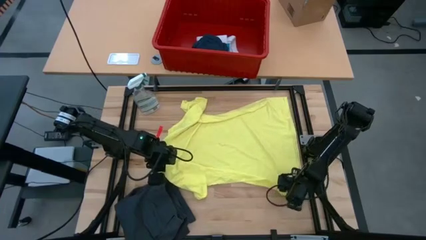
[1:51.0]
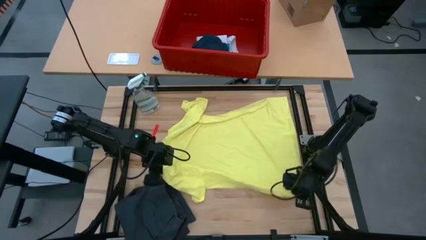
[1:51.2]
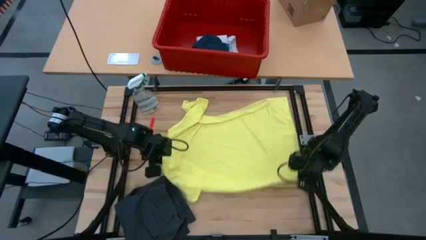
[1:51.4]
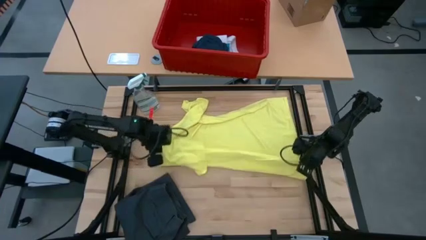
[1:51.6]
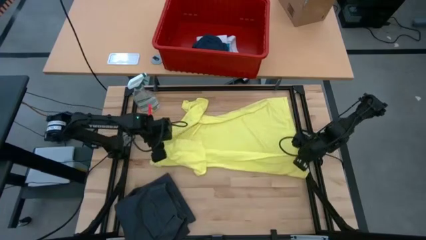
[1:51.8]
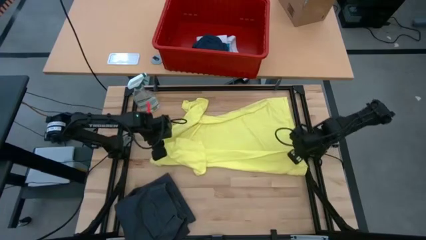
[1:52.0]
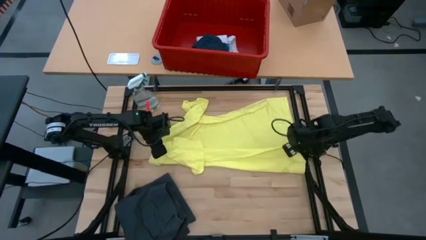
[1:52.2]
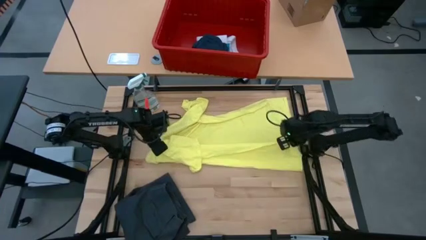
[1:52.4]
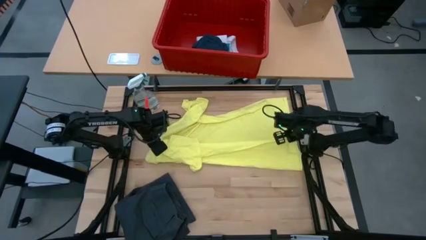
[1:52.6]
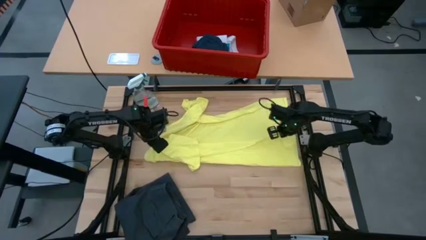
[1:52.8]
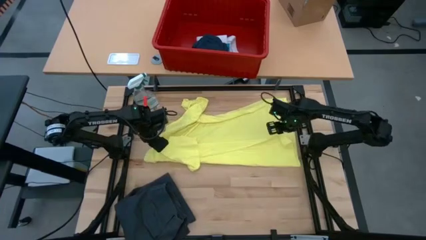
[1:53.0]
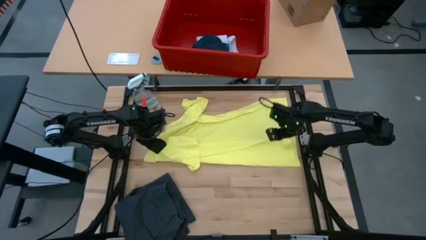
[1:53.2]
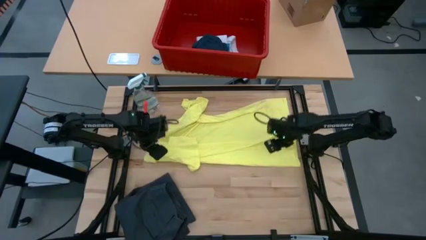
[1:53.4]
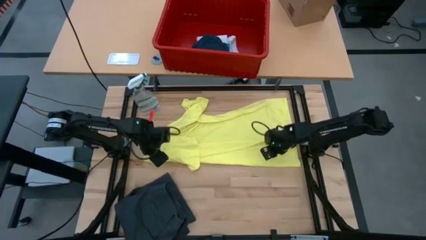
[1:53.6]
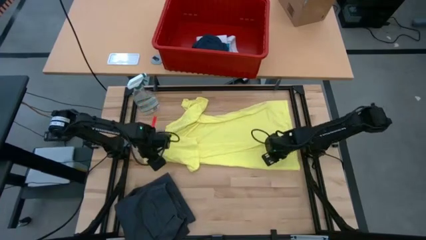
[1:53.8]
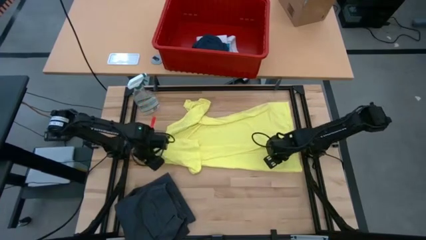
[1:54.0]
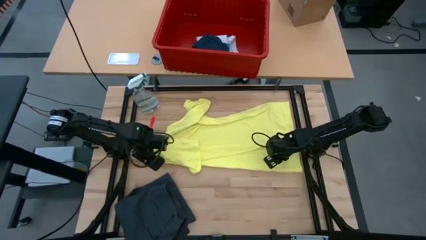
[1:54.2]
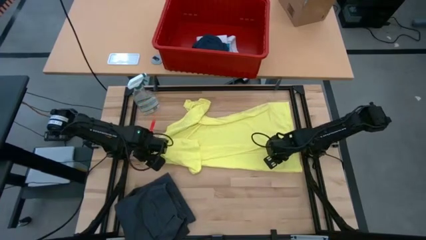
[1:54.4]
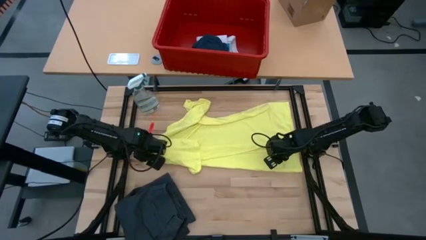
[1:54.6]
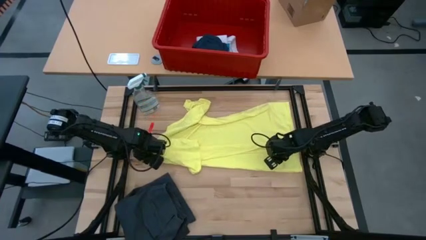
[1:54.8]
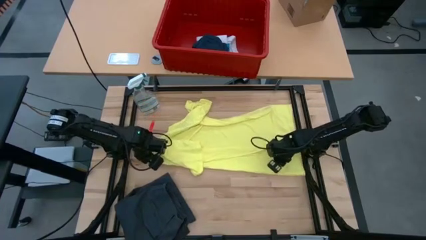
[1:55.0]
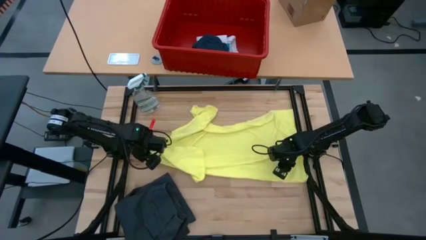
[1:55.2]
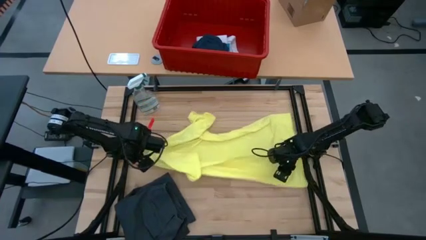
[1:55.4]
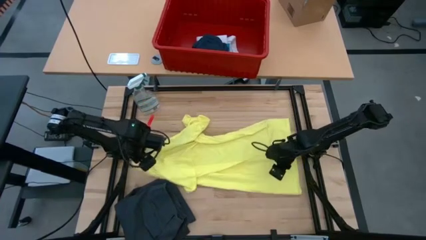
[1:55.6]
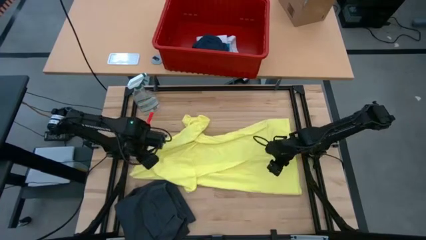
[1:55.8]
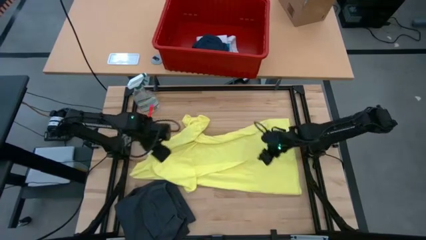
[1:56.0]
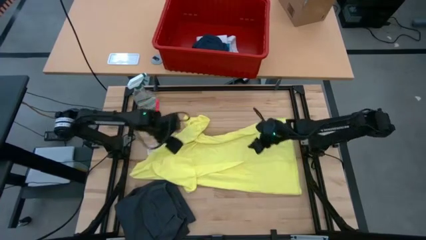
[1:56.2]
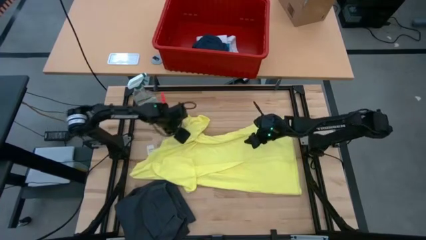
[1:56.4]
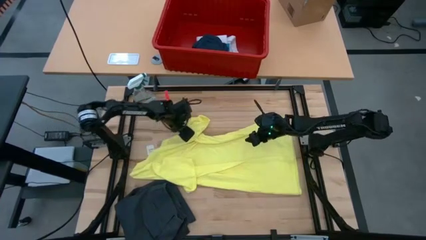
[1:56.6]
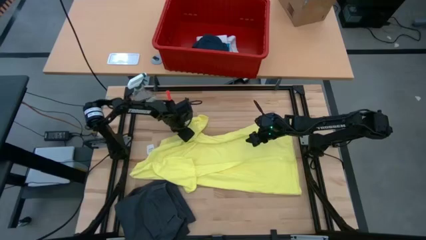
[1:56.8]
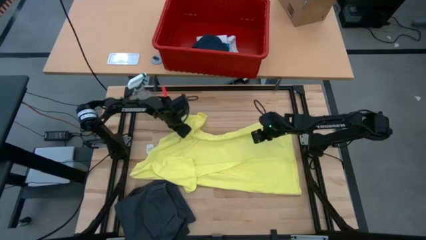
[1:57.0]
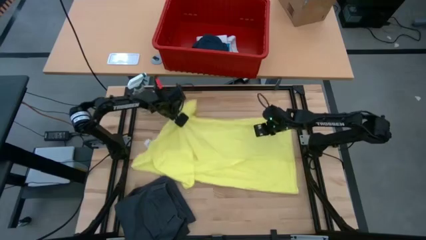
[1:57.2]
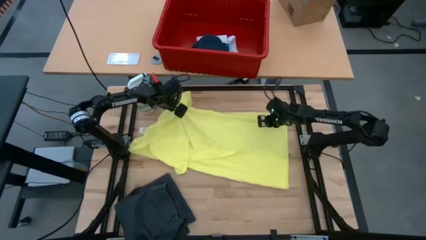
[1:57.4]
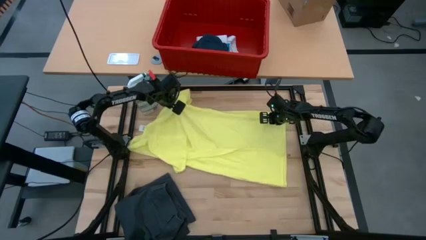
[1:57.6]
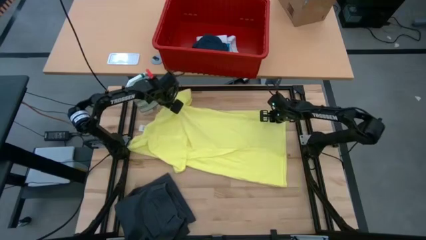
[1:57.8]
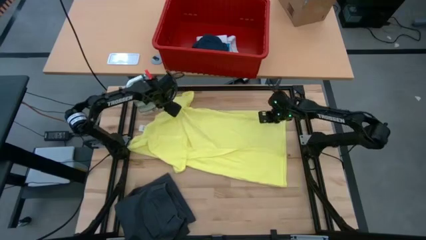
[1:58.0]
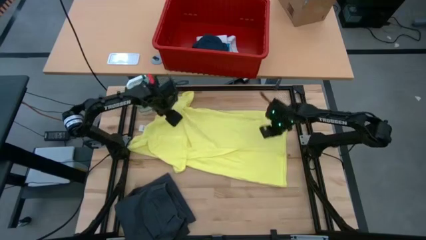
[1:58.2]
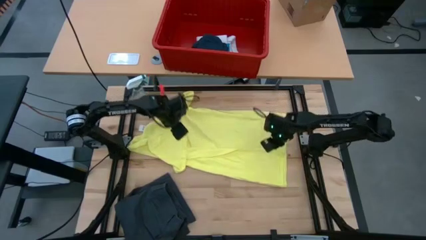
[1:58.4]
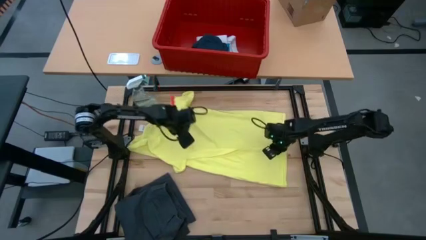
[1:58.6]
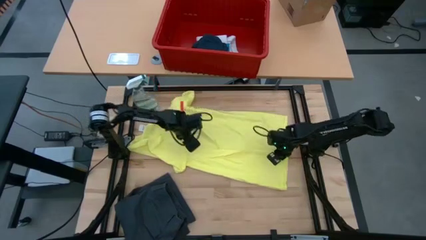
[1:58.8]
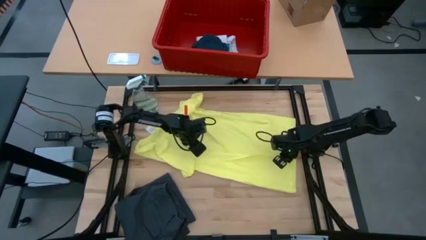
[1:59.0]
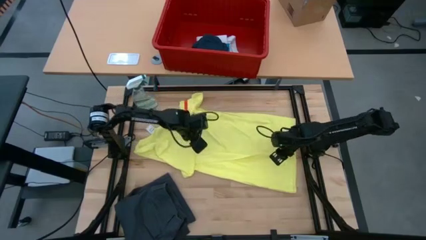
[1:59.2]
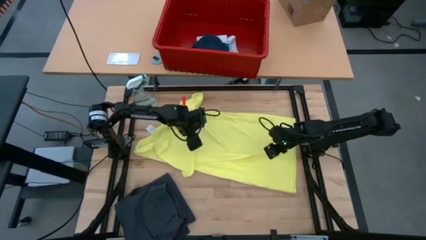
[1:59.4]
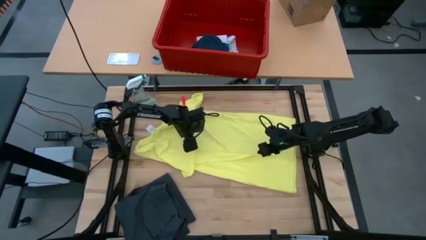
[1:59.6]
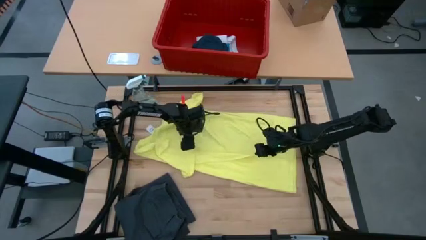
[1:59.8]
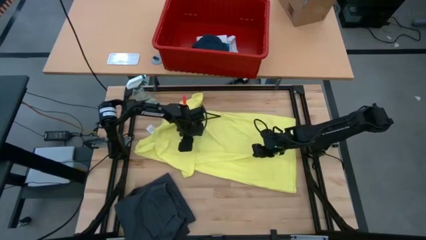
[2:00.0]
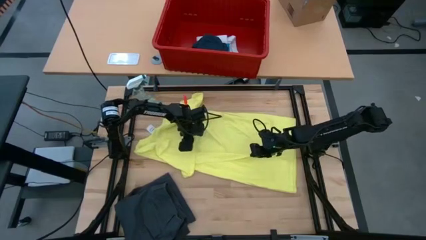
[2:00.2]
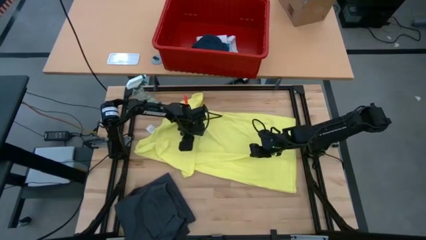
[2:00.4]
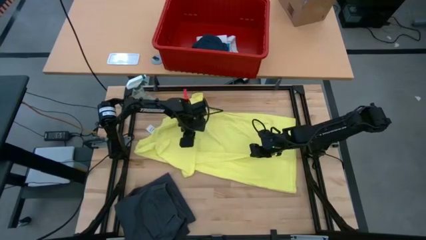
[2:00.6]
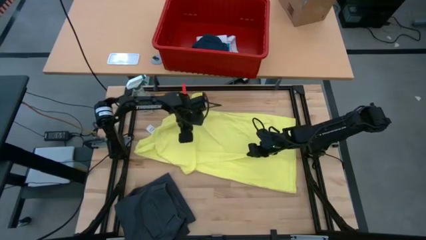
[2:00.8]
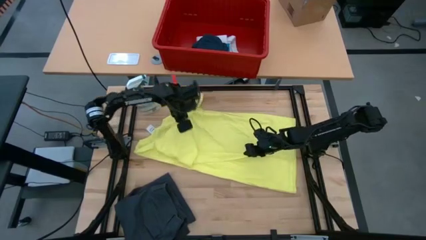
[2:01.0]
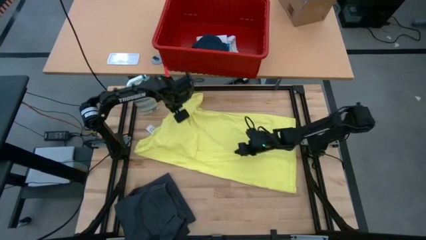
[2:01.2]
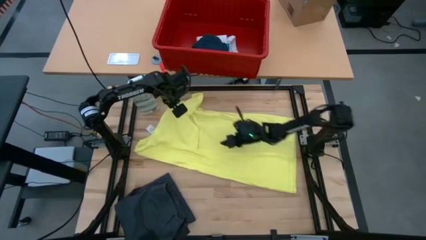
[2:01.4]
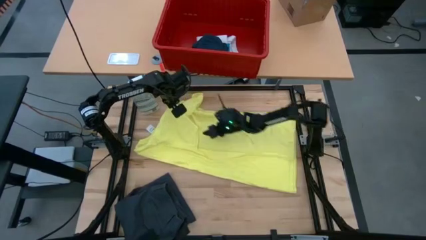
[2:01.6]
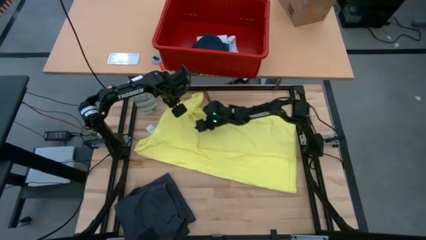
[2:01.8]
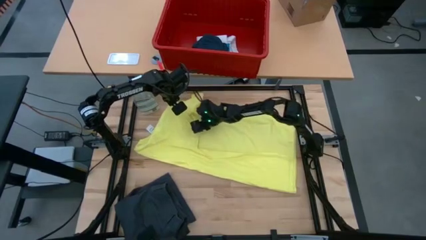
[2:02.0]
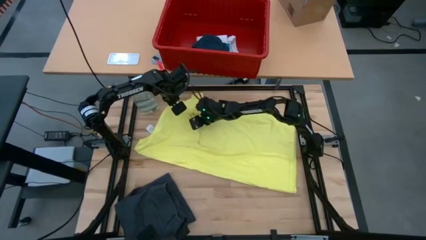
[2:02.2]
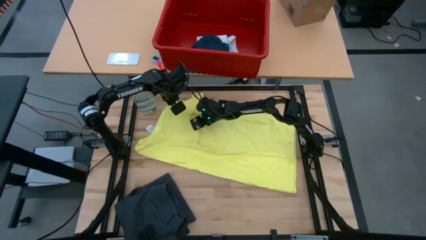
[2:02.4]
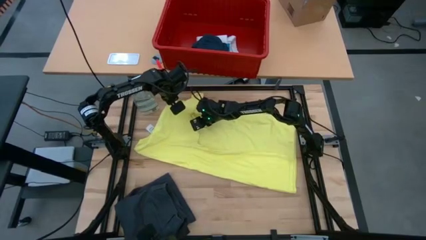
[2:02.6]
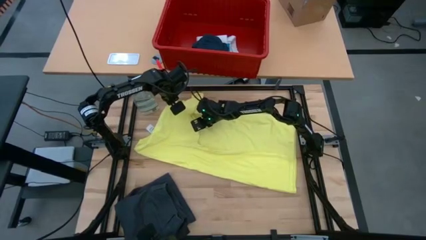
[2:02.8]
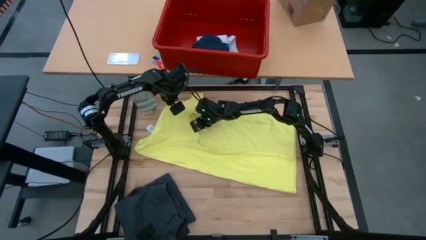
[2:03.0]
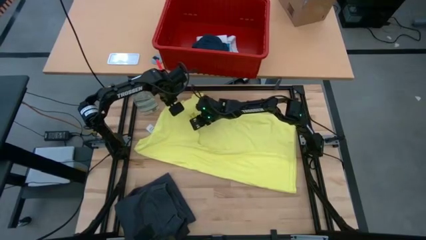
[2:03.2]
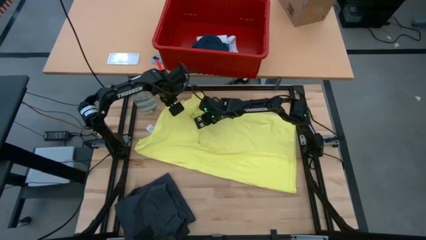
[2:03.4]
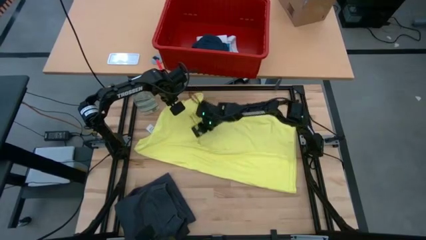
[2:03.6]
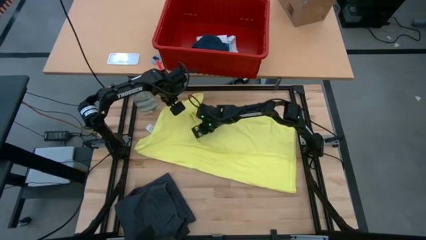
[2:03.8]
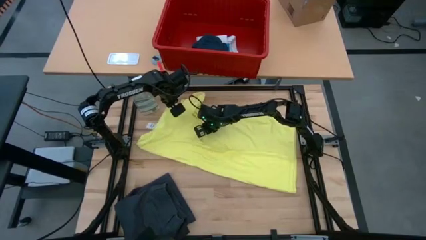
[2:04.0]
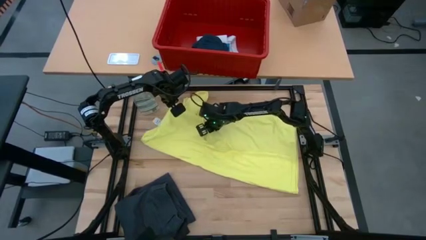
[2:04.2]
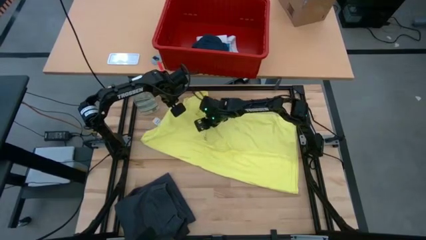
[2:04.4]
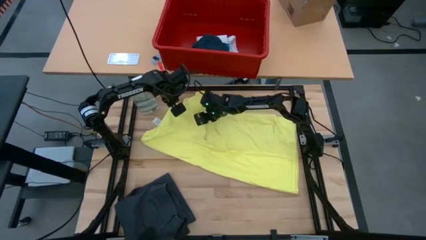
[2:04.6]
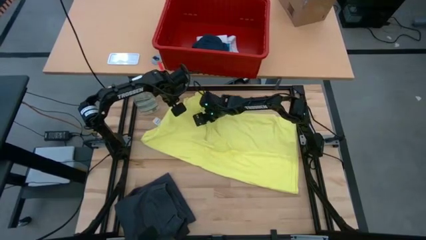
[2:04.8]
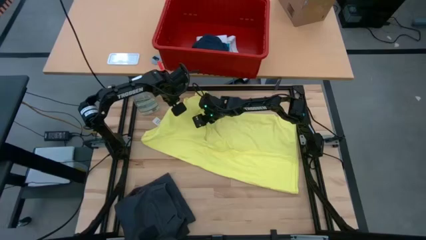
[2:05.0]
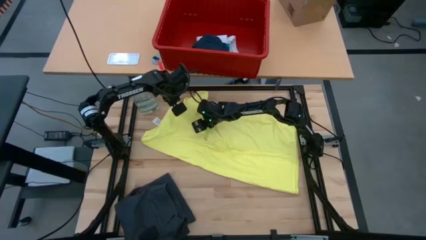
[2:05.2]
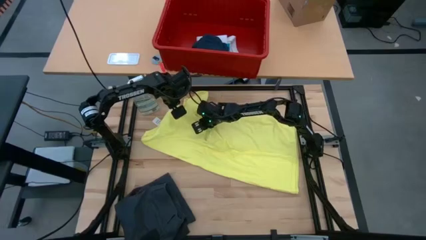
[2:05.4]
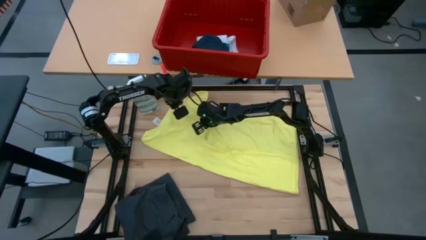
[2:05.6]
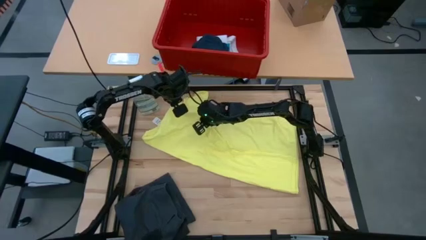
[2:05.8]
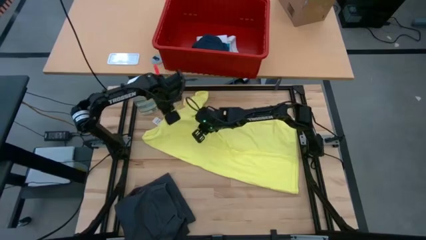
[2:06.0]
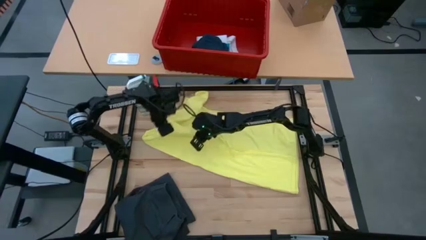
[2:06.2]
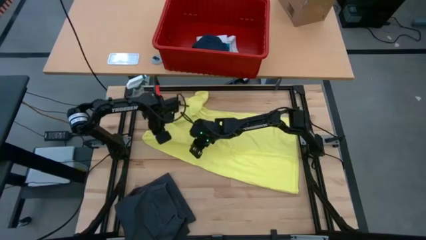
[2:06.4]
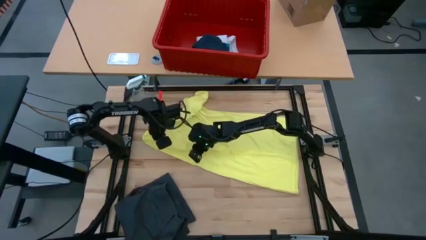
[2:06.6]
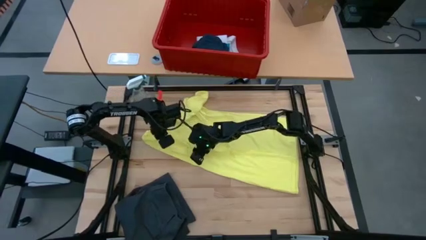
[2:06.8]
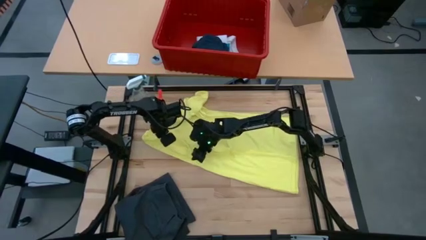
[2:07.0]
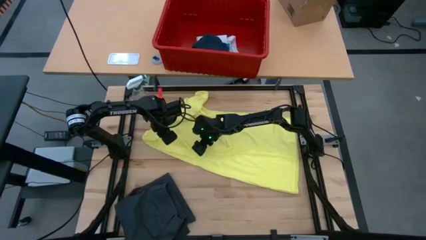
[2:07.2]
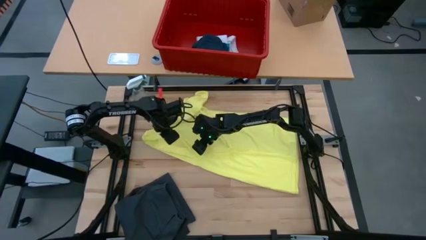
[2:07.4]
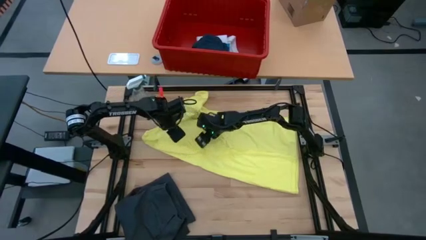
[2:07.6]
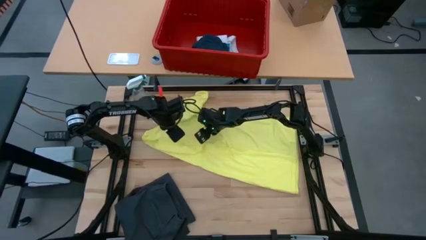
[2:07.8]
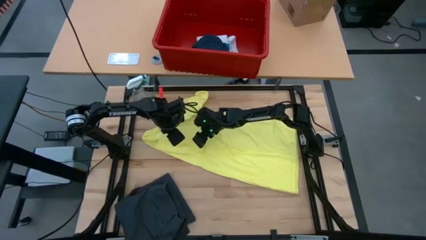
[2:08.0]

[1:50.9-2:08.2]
Task: Fold Laundry from Bin
Fold the yellow shirt
